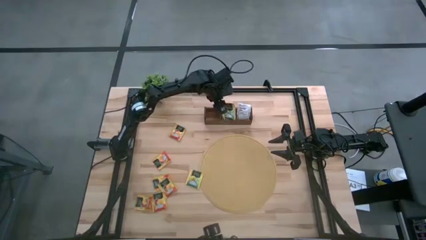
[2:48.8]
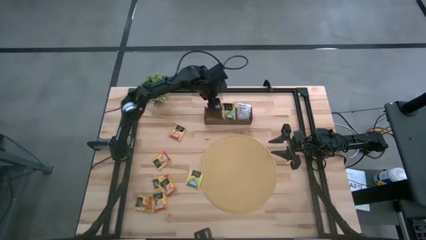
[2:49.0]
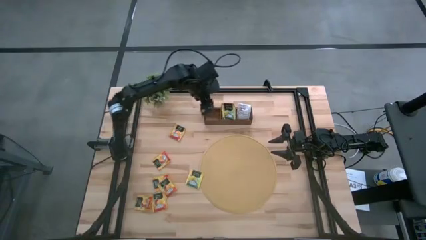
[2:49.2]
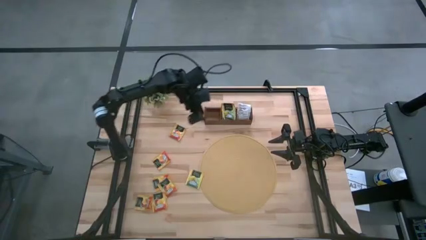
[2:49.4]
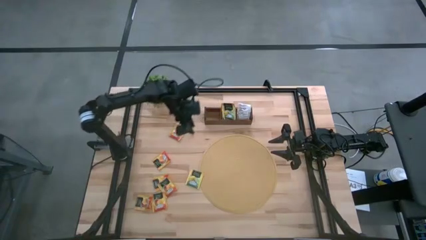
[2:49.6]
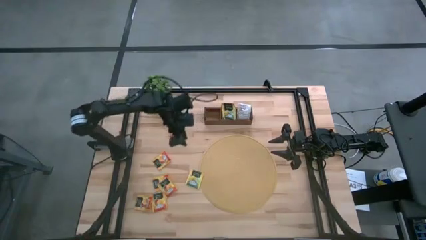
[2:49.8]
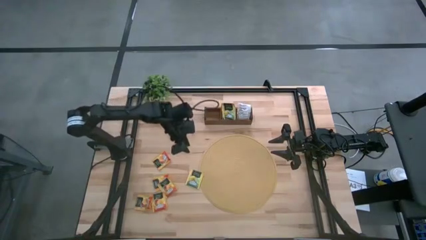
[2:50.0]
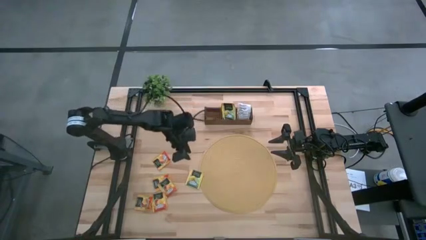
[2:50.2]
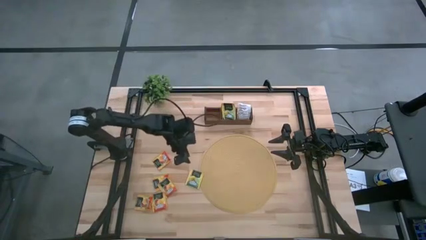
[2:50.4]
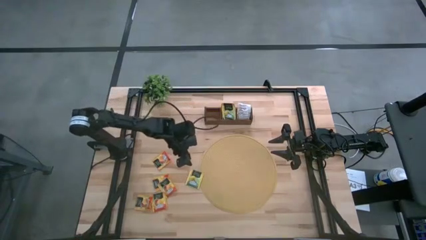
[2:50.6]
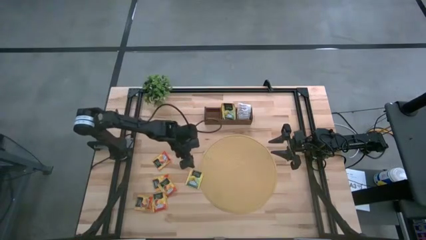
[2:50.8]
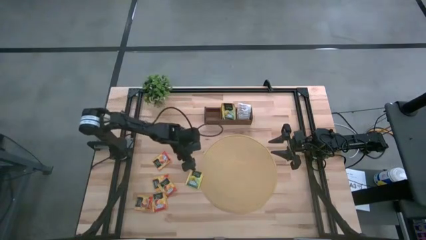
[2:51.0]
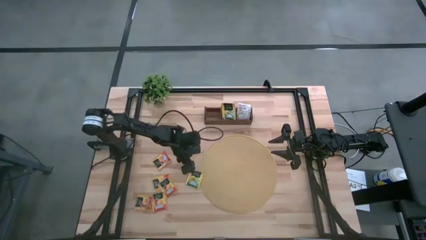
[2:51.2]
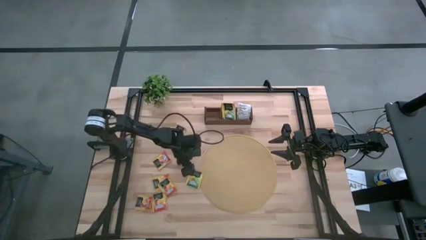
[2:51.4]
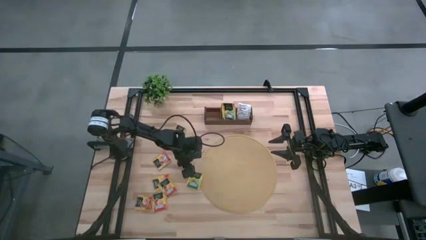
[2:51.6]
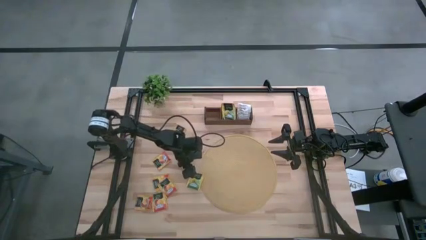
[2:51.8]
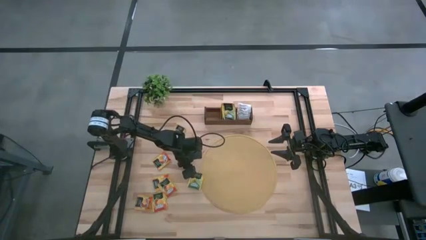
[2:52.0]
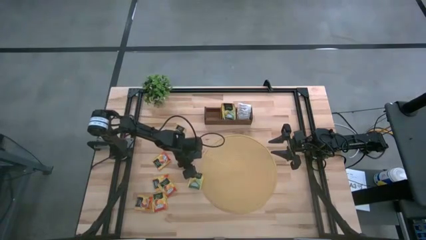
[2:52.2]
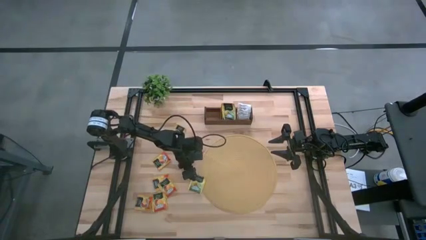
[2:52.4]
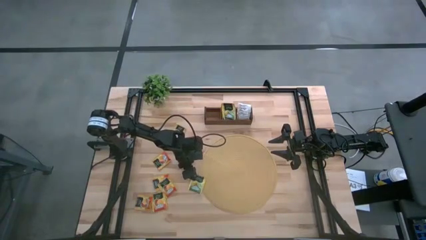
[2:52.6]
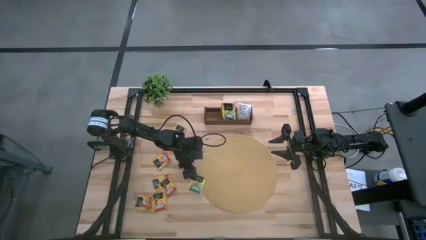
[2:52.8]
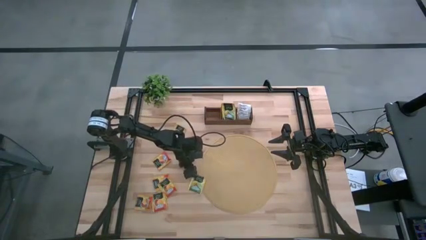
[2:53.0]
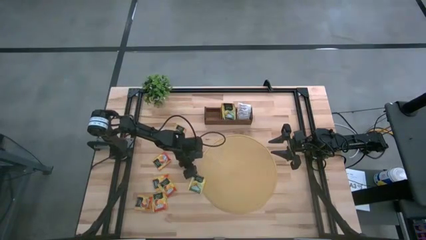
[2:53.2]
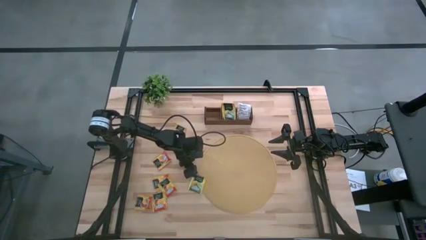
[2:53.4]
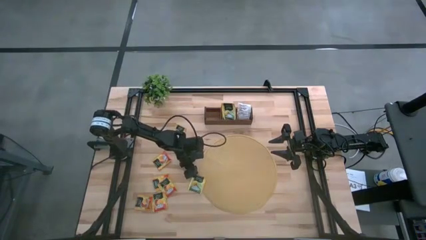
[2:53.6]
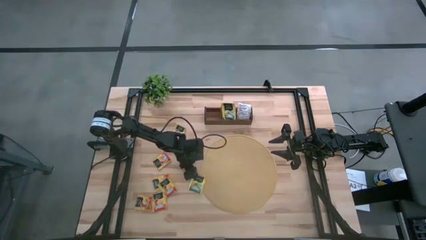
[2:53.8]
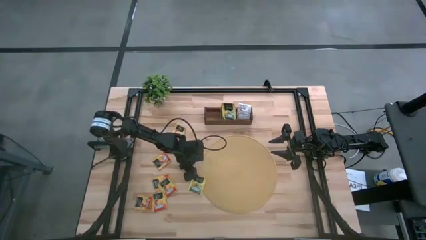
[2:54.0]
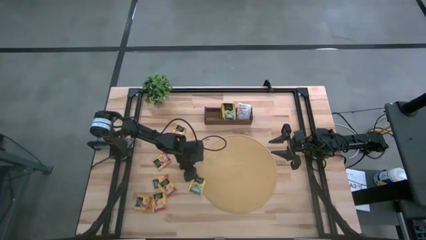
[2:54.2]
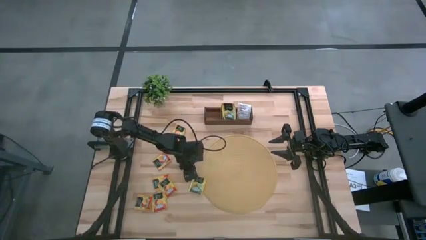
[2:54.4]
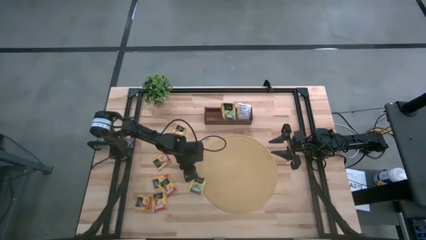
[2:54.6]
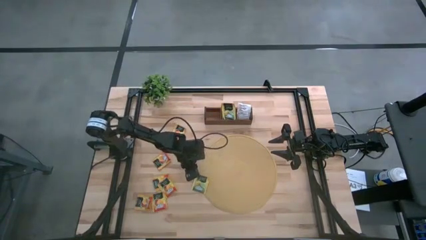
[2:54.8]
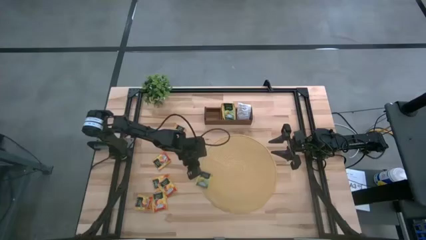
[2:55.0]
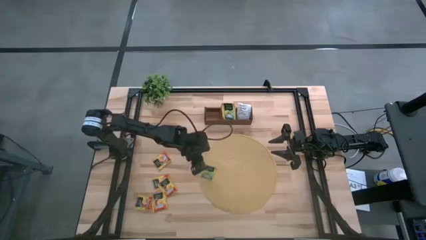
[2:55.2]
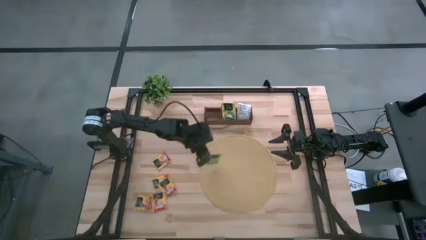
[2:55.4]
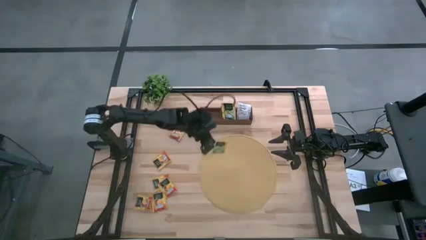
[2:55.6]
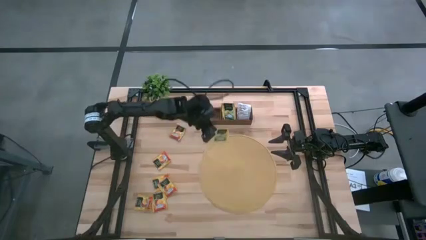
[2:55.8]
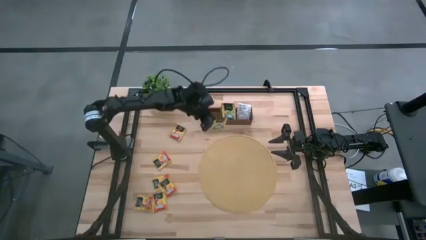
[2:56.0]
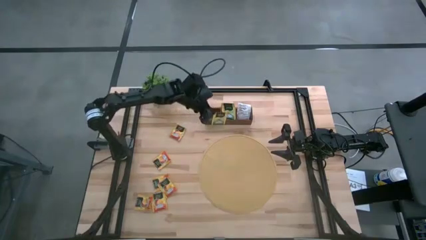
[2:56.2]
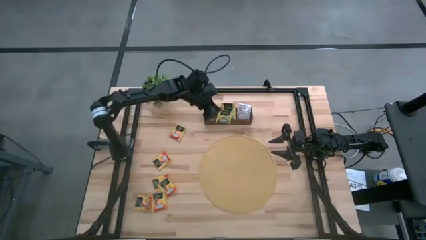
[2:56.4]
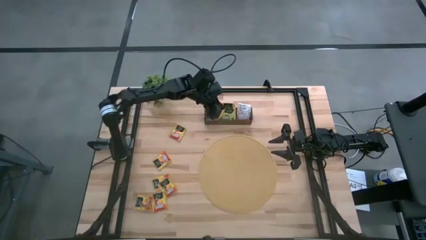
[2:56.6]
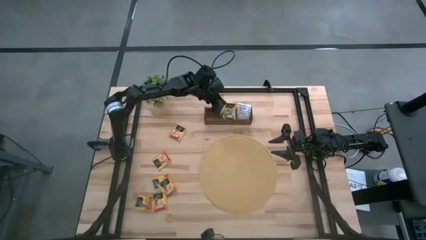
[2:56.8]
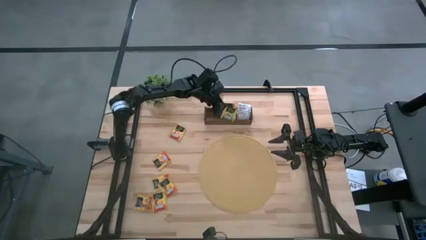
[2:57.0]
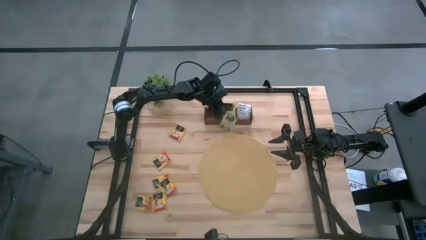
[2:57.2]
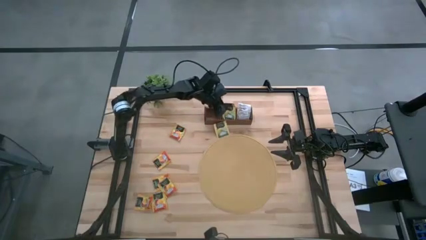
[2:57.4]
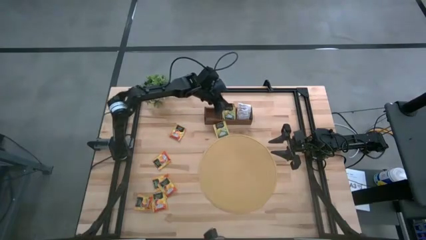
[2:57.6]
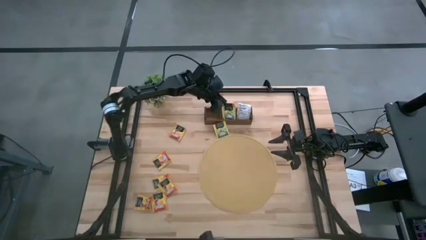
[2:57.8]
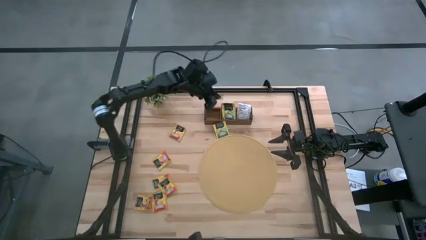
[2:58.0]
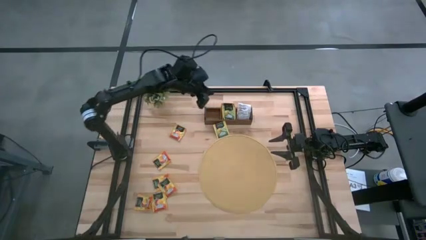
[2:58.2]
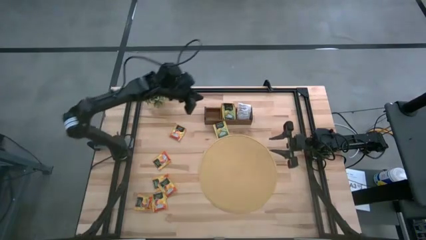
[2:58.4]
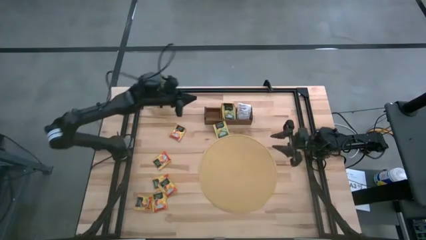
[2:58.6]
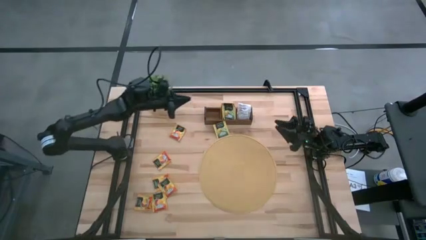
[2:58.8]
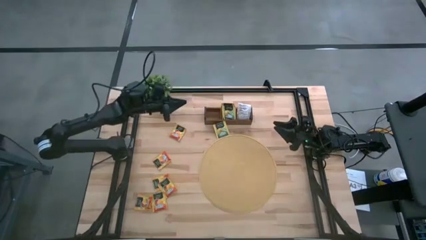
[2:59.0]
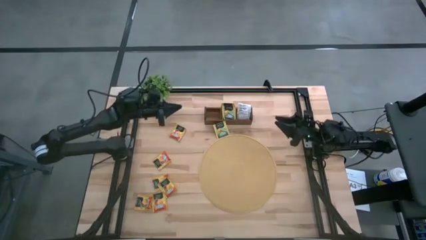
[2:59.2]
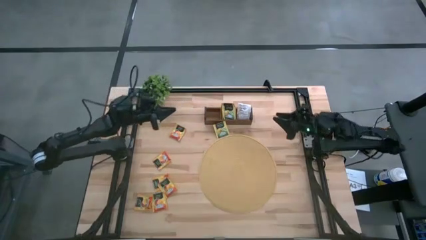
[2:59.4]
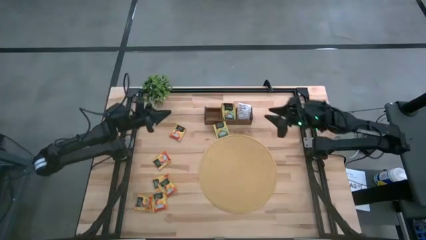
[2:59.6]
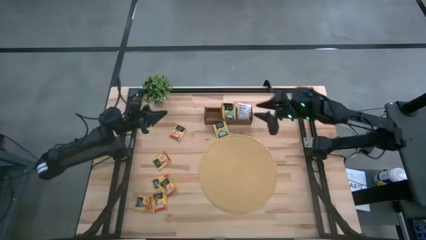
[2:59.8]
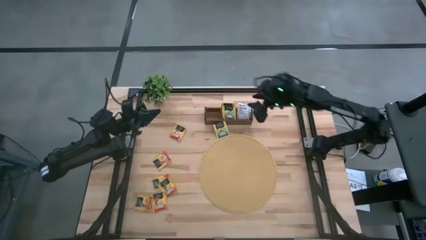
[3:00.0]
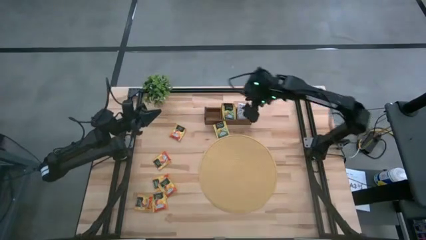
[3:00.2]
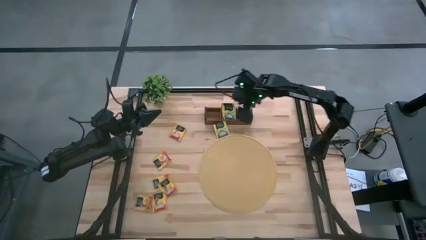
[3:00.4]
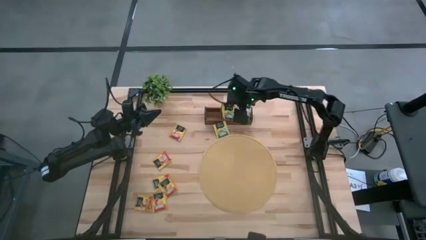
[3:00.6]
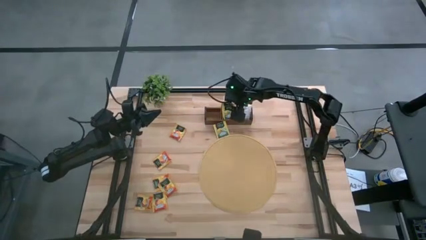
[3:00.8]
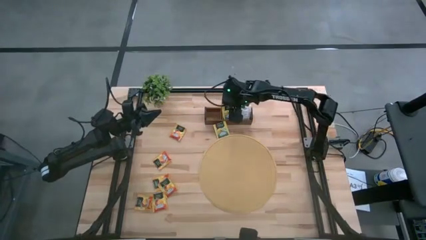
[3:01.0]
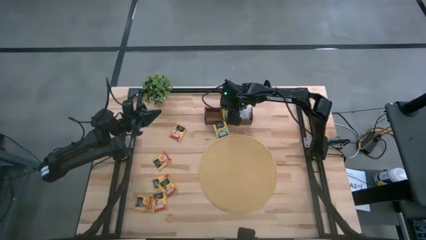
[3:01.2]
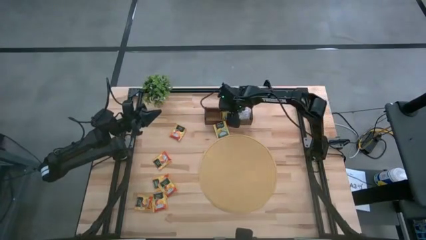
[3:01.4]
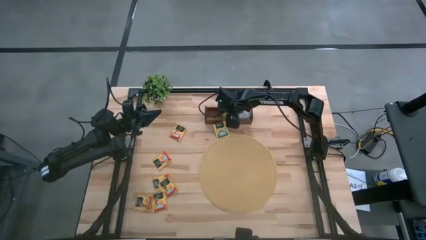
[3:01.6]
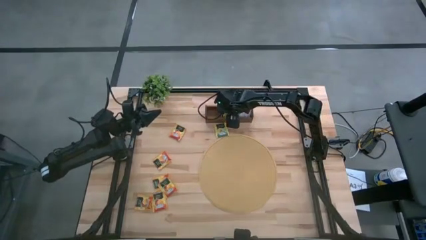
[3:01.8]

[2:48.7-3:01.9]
Task: Pick & Place Tea
Put the yellow tea bag into the middle section of the wooden organizer
